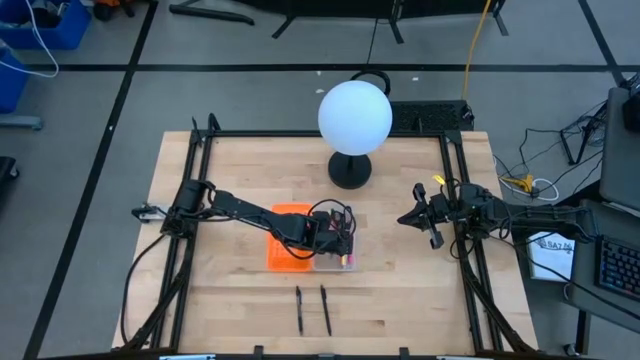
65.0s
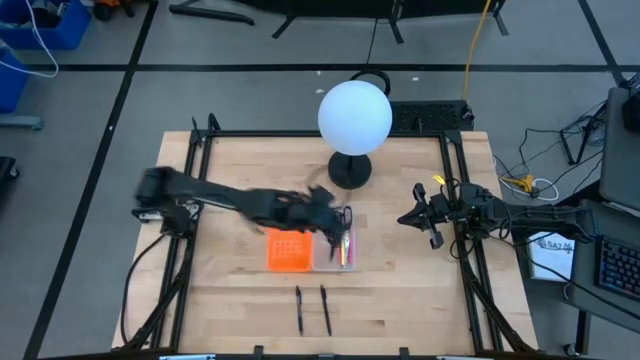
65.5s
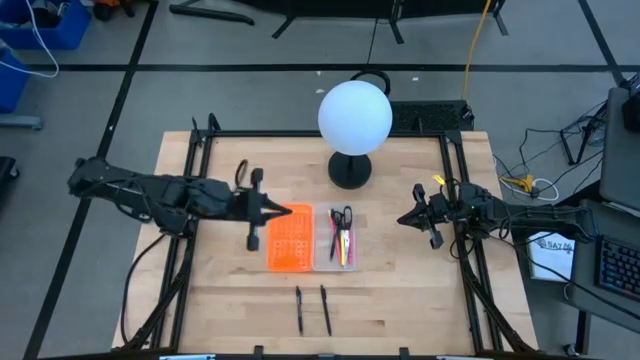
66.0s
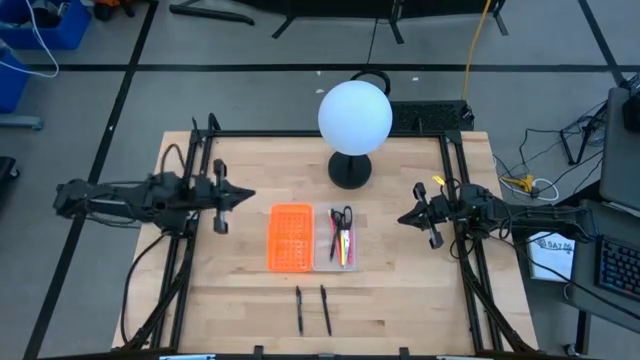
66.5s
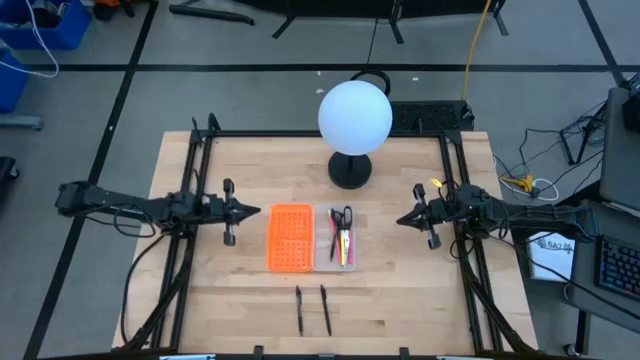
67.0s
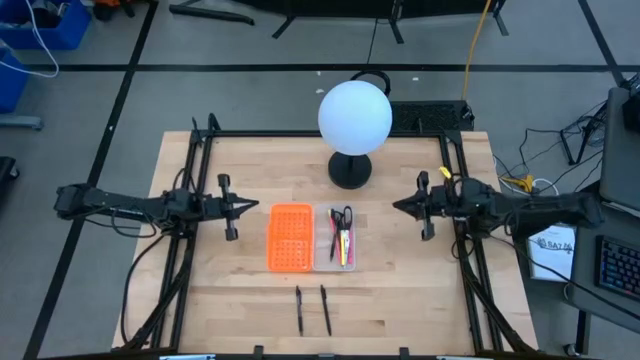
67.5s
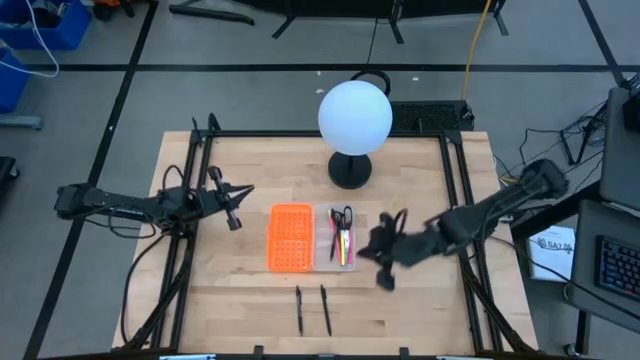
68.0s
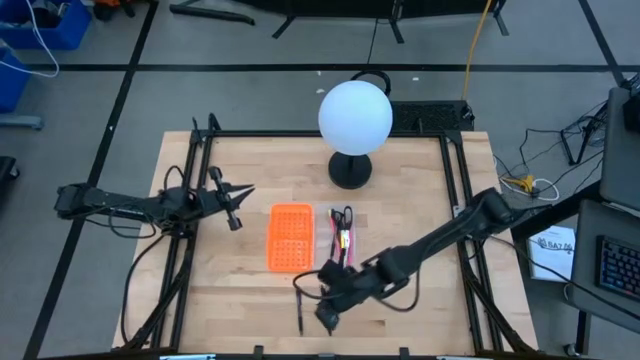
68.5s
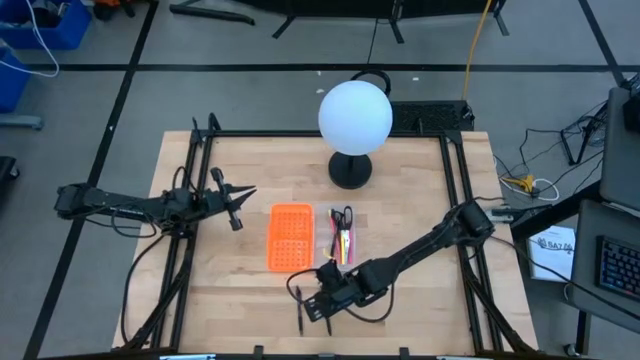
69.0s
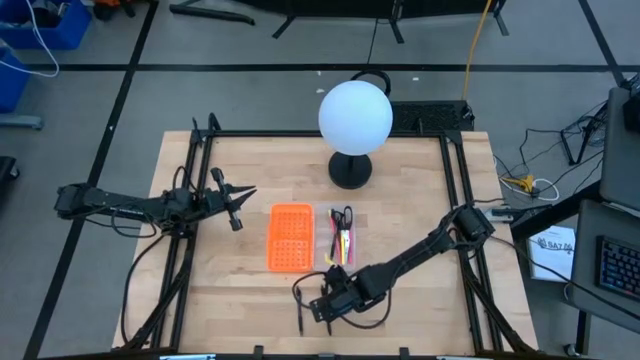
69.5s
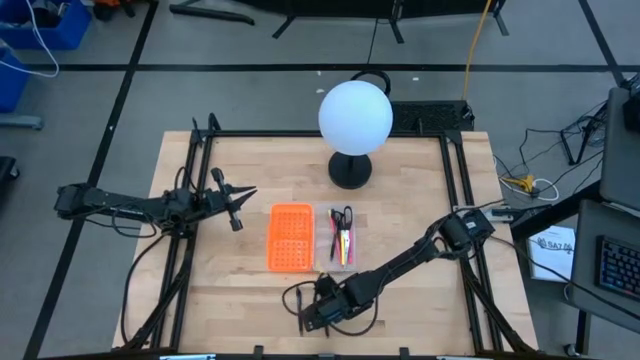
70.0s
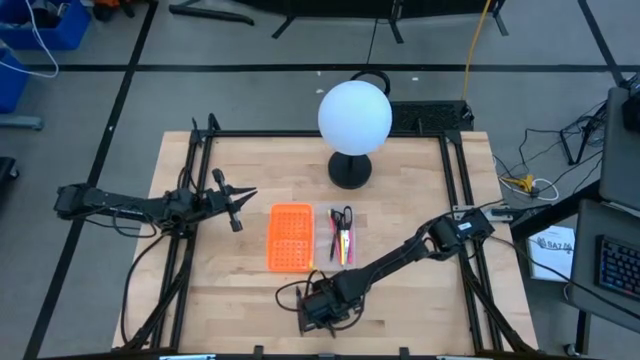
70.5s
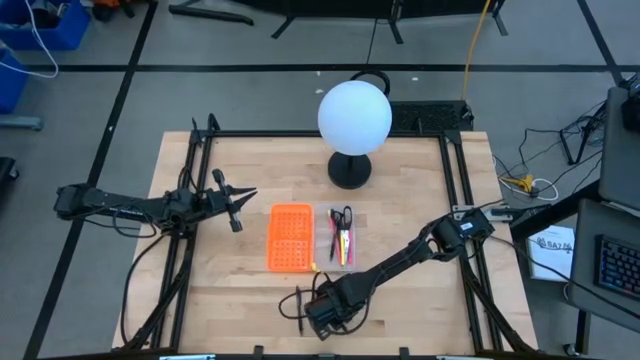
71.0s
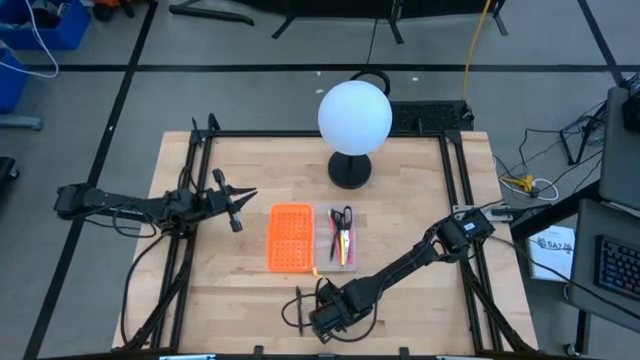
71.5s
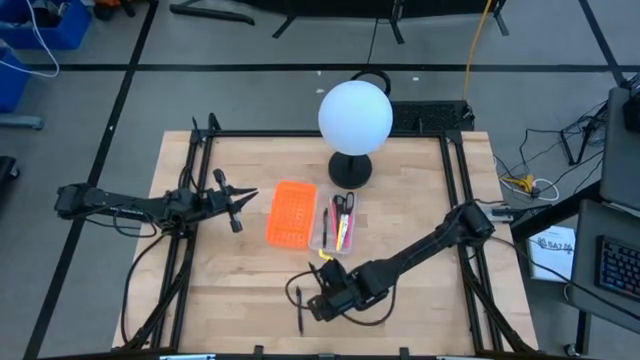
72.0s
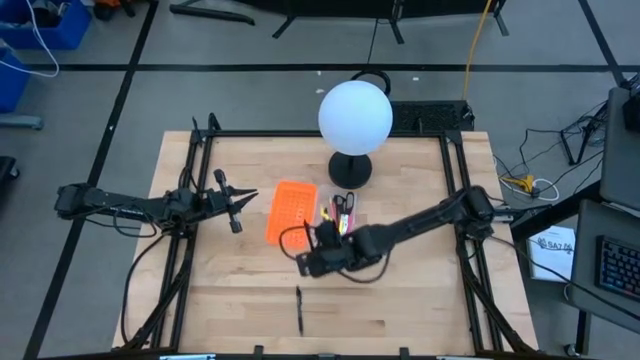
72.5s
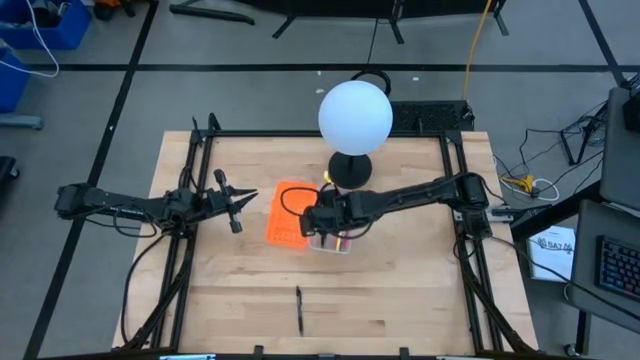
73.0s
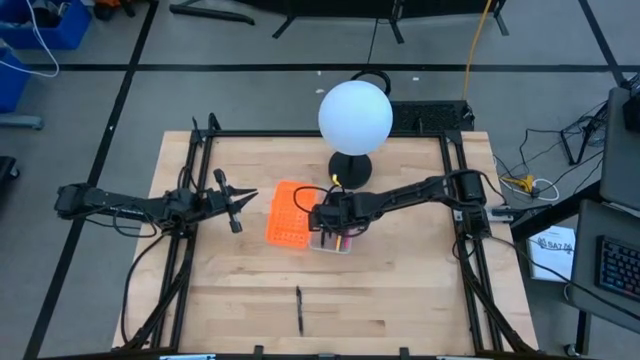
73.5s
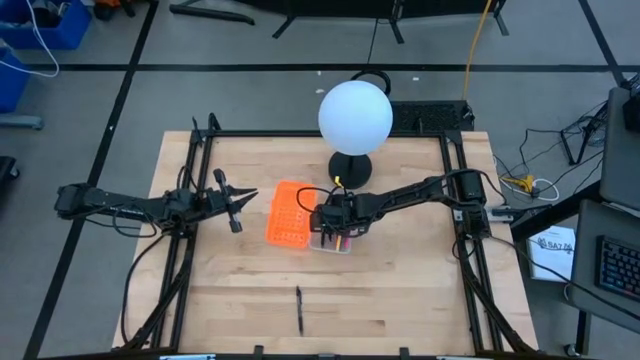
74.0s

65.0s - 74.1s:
Task: Pick & place school supplies into a supply box
Put the right black pen into the supply box

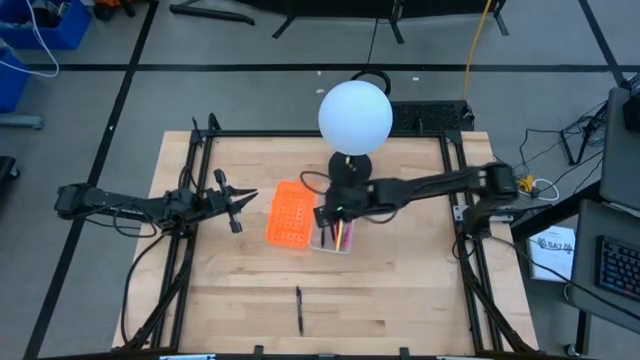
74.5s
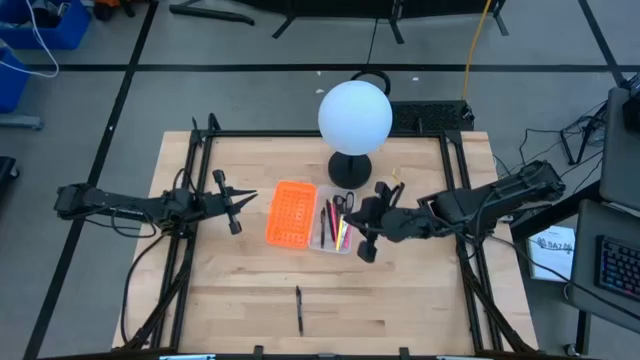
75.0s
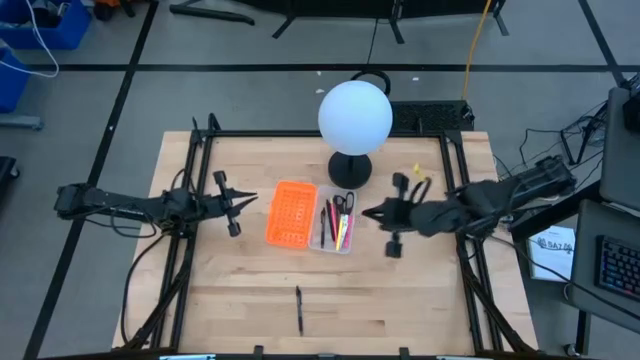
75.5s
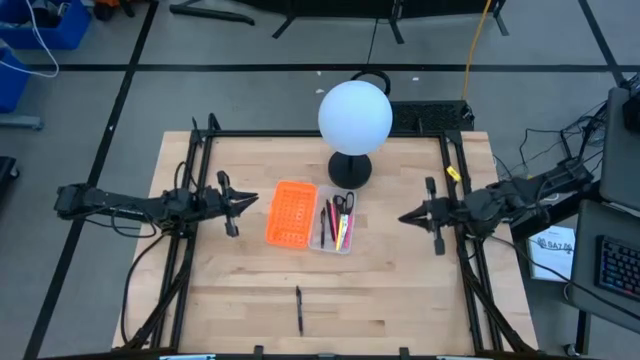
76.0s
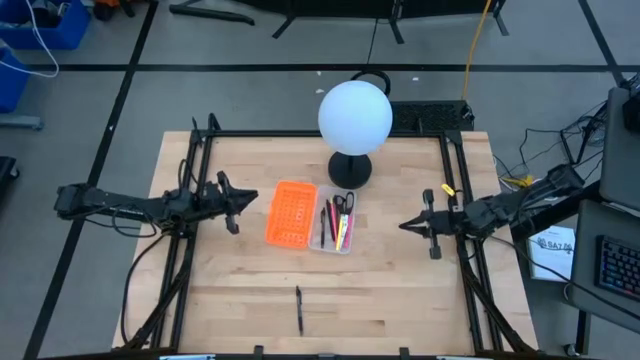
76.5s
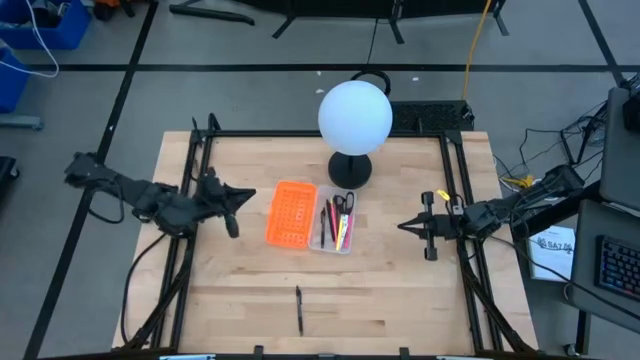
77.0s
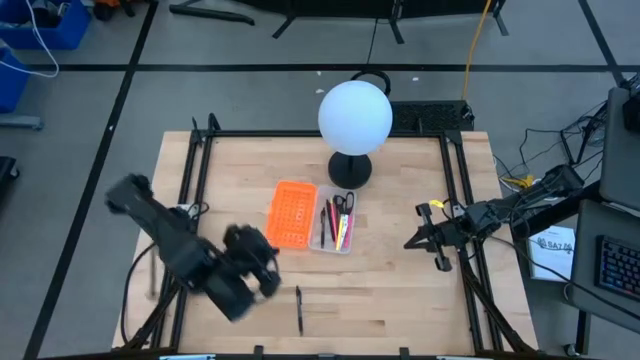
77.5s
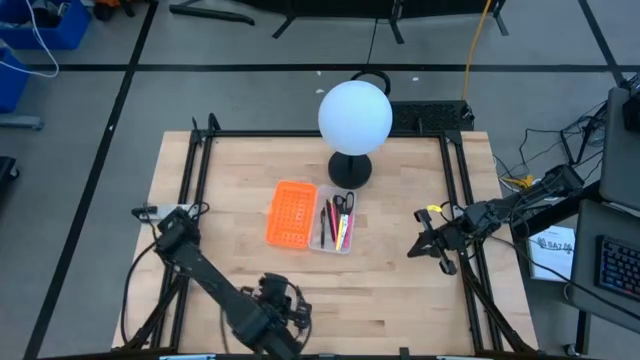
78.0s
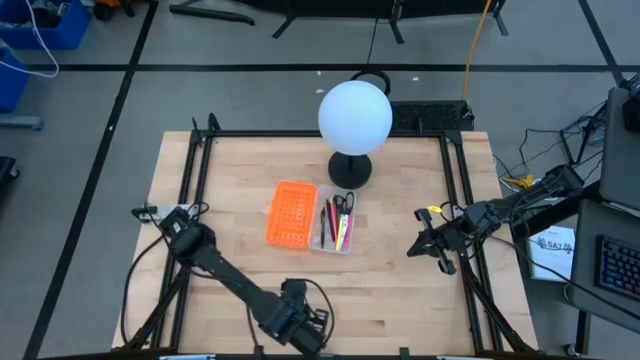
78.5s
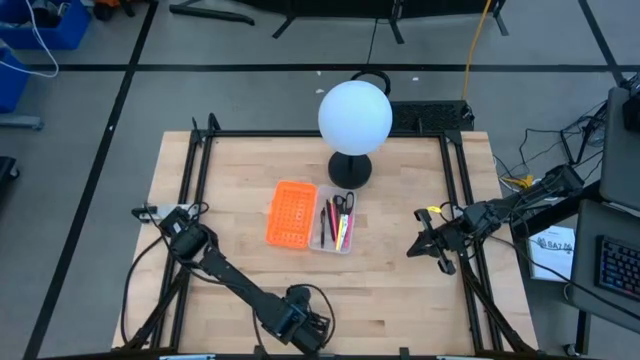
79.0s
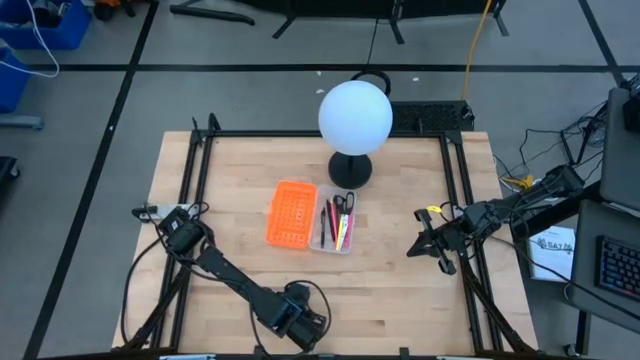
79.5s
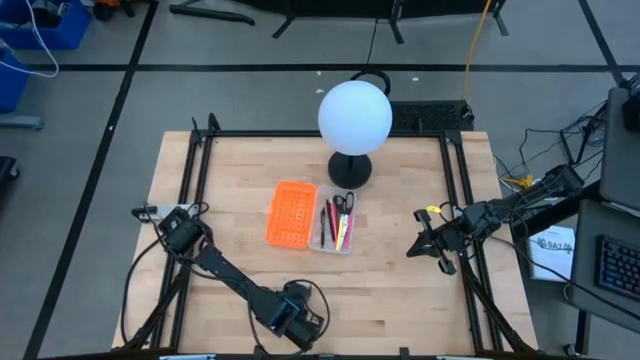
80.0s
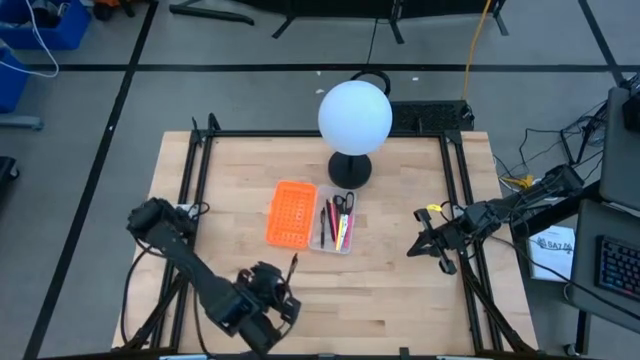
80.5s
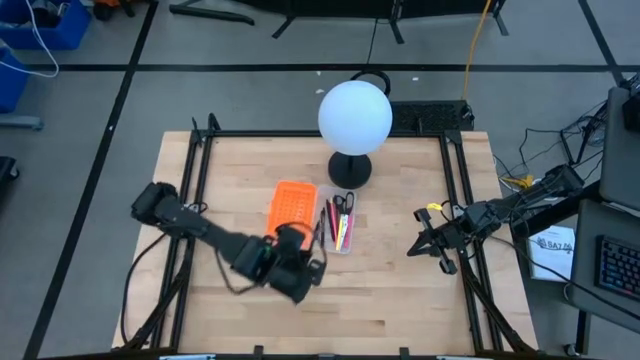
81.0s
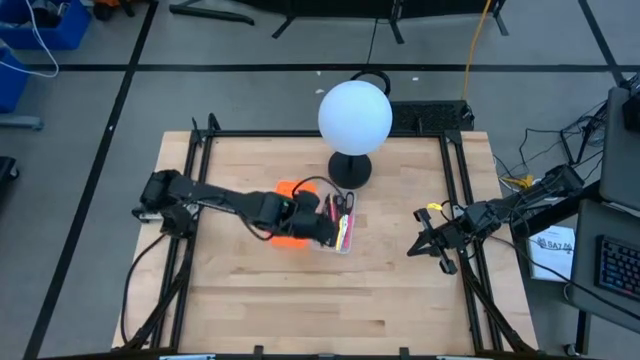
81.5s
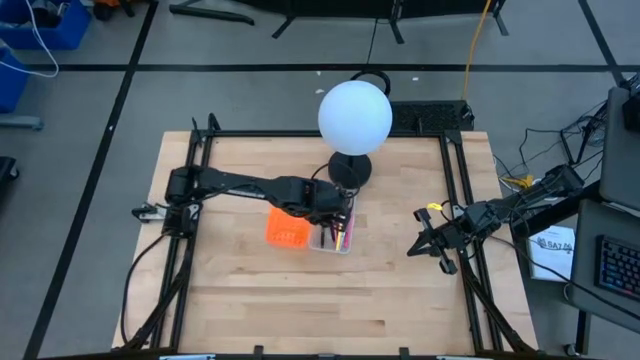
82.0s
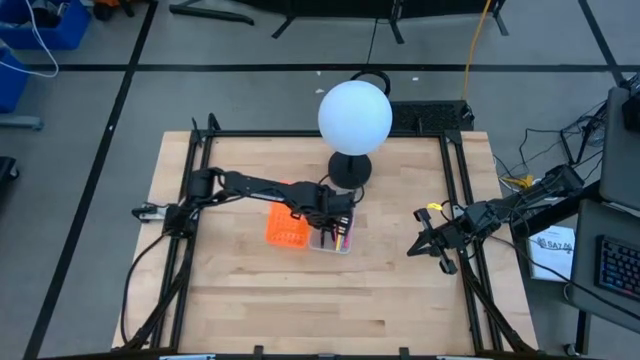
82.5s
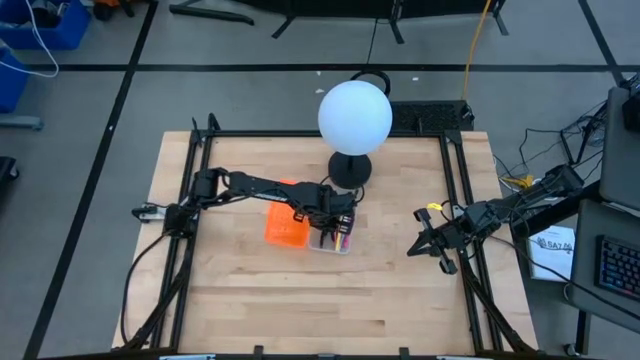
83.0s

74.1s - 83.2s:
Put the black pen into the supply box

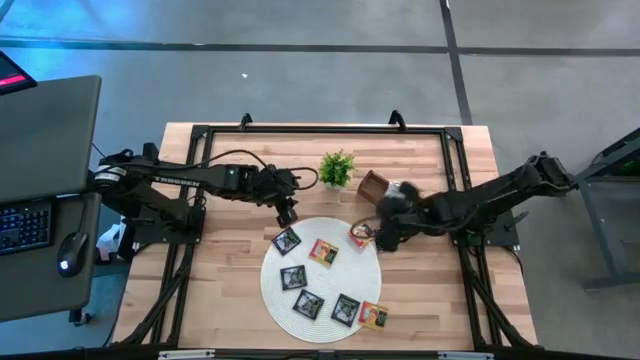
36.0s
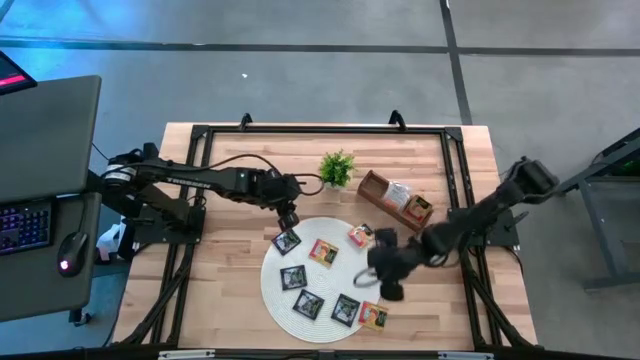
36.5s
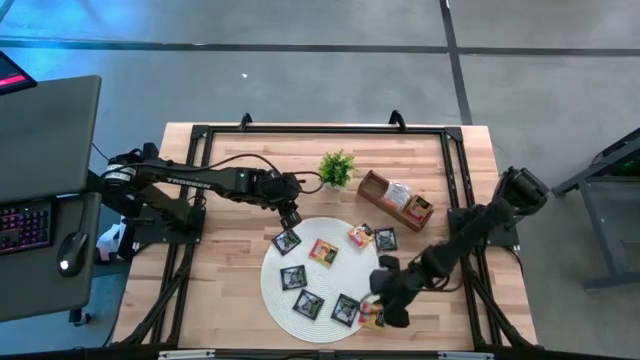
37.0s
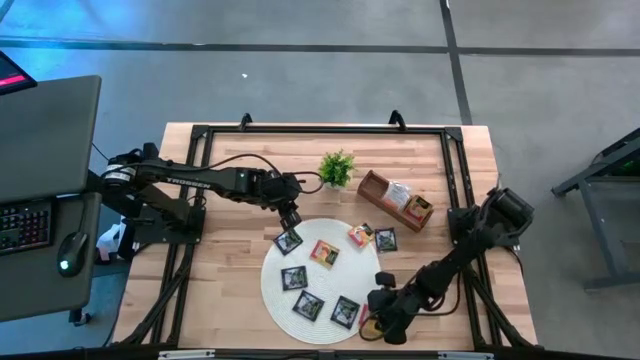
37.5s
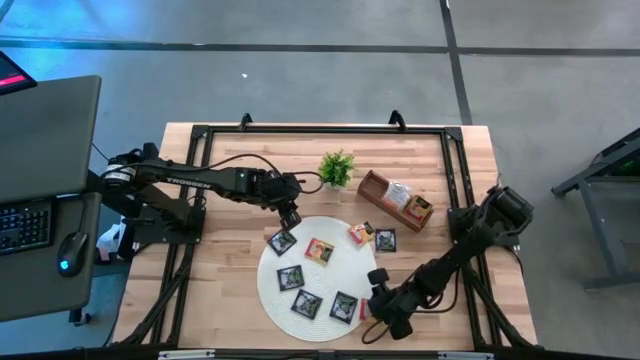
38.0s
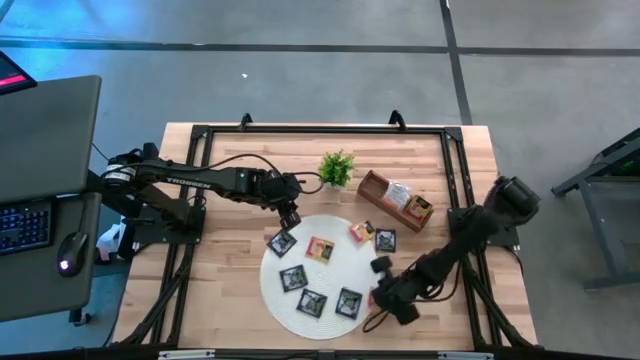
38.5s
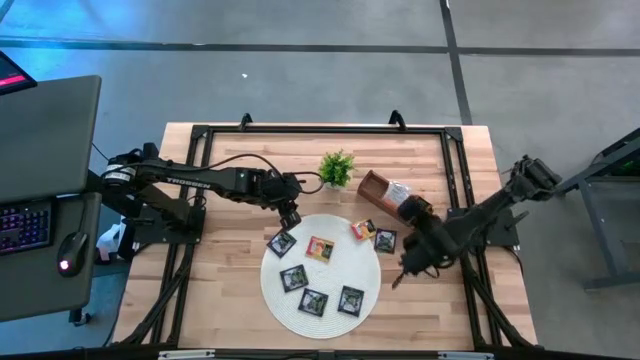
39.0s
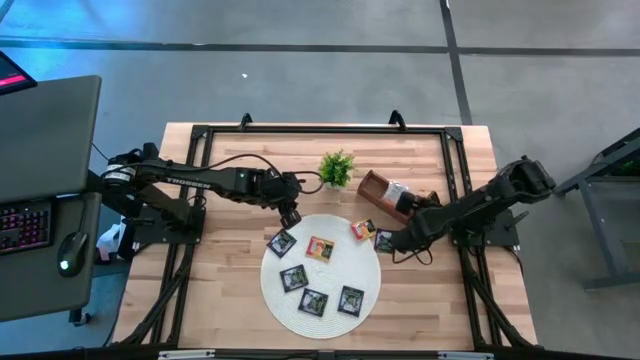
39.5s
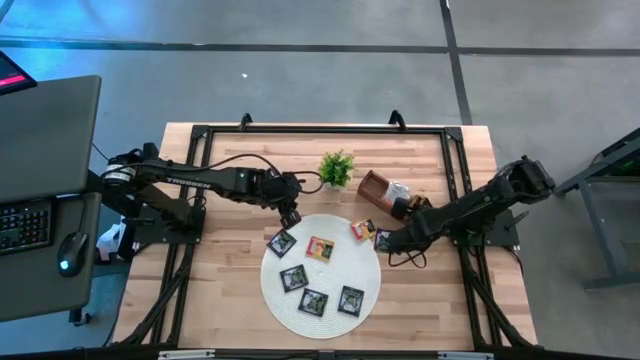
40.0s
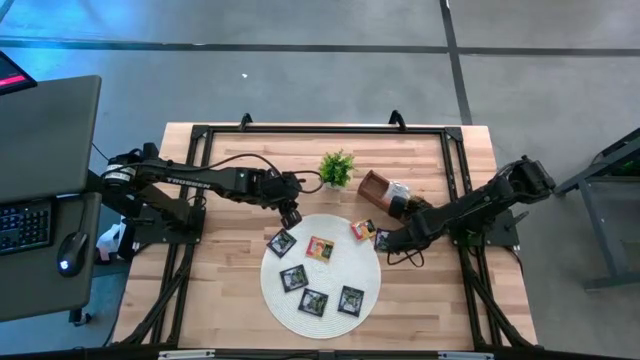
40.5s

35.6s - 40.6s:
Task: Pick & Place Tea
Put the yellow tea bag into the right section of the wooden organizer
